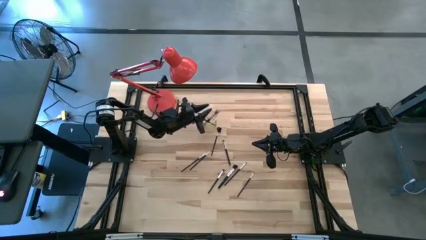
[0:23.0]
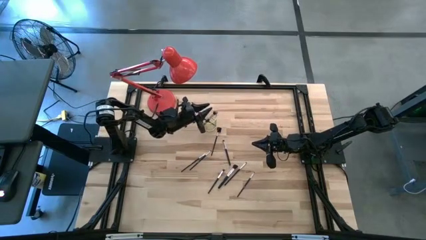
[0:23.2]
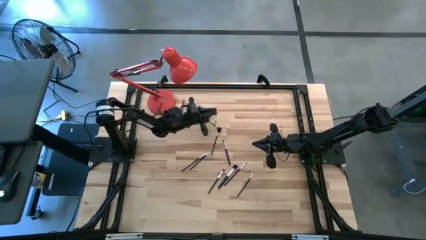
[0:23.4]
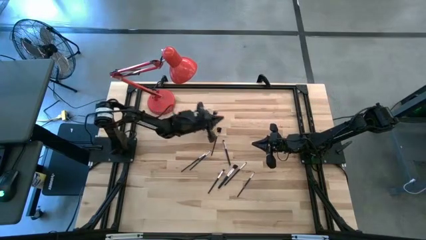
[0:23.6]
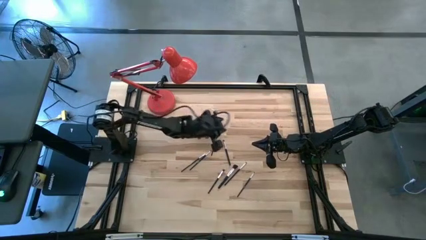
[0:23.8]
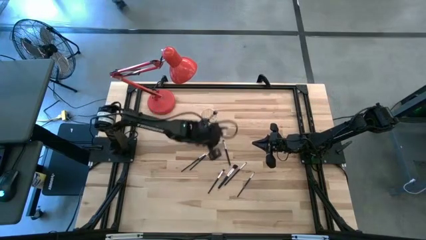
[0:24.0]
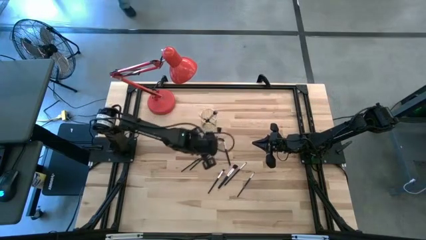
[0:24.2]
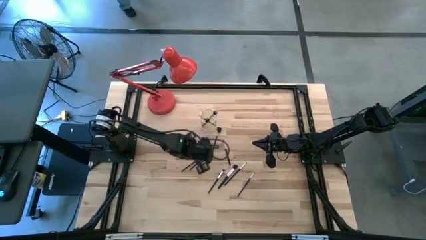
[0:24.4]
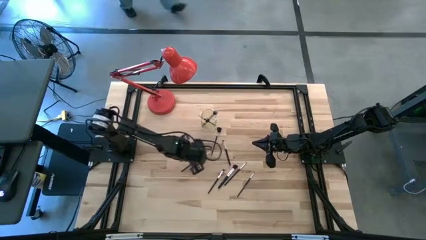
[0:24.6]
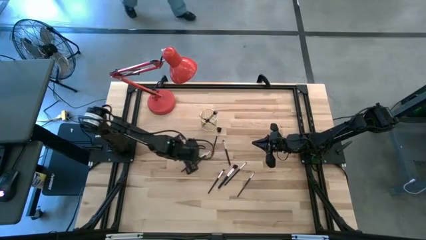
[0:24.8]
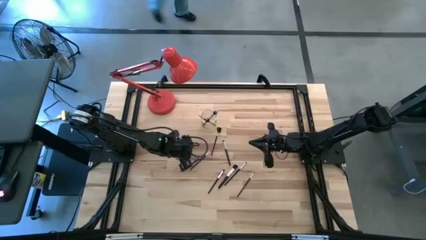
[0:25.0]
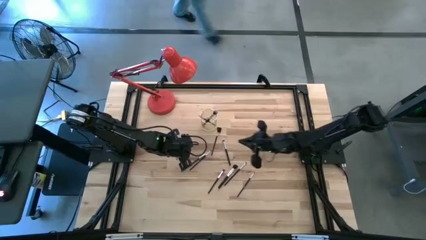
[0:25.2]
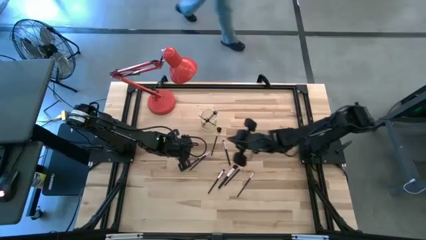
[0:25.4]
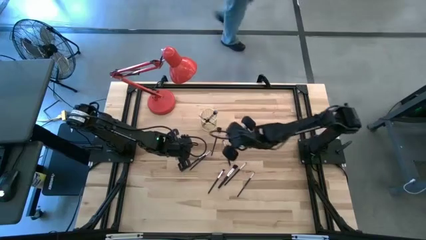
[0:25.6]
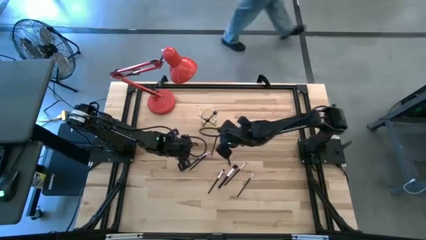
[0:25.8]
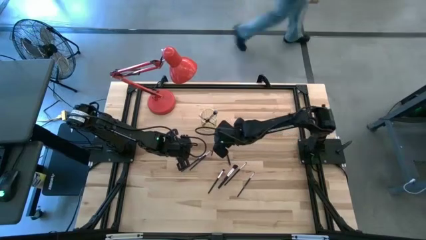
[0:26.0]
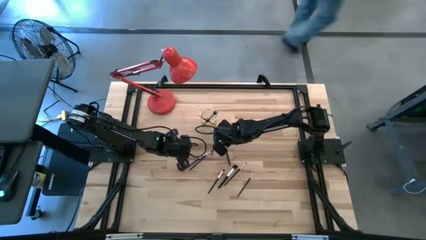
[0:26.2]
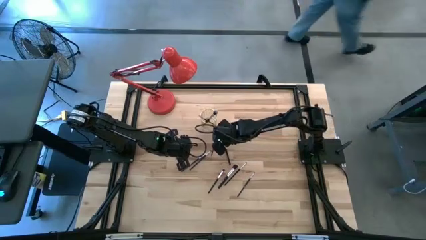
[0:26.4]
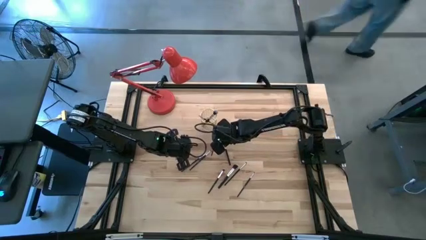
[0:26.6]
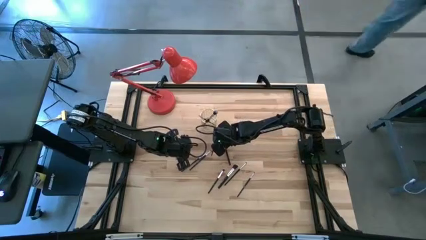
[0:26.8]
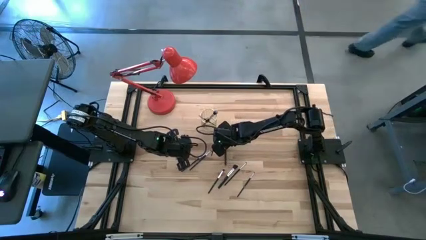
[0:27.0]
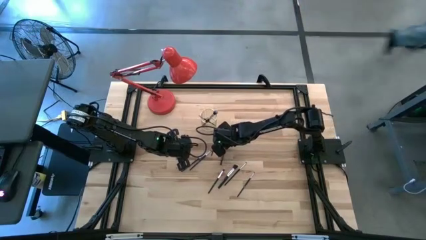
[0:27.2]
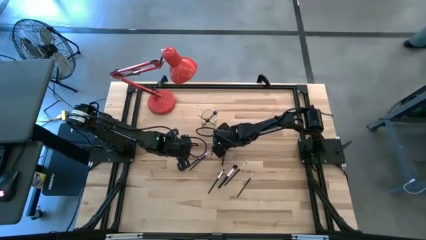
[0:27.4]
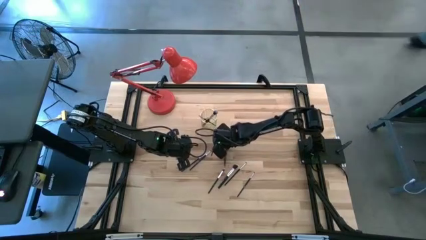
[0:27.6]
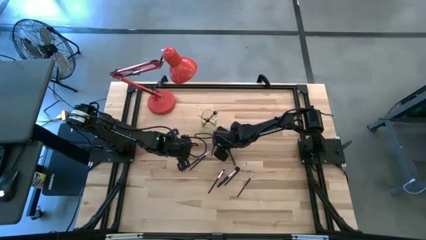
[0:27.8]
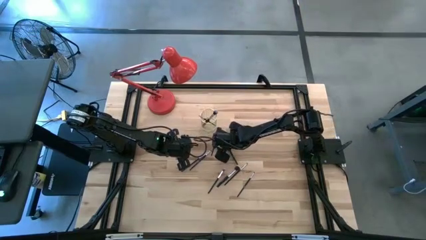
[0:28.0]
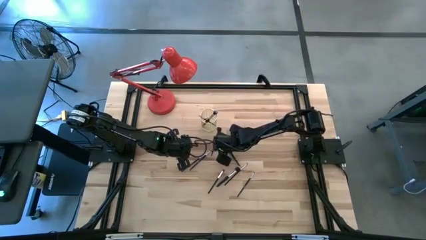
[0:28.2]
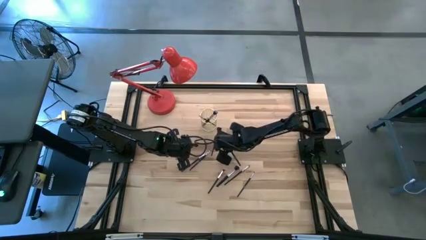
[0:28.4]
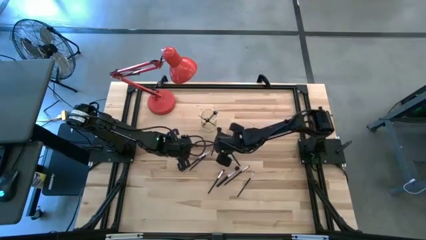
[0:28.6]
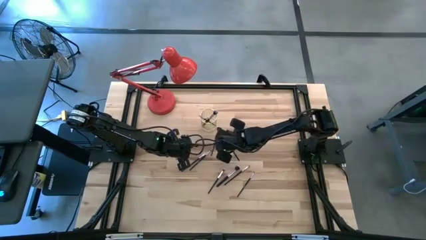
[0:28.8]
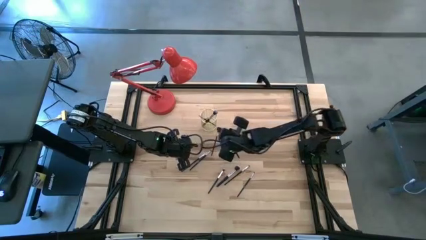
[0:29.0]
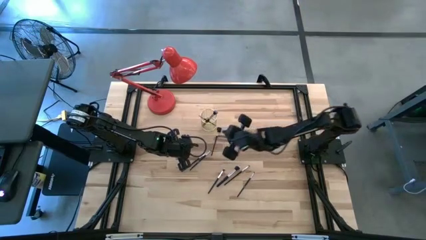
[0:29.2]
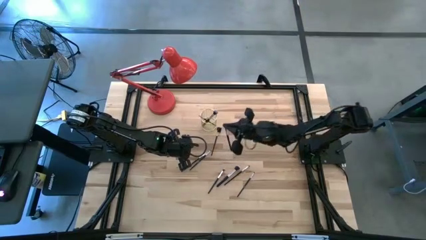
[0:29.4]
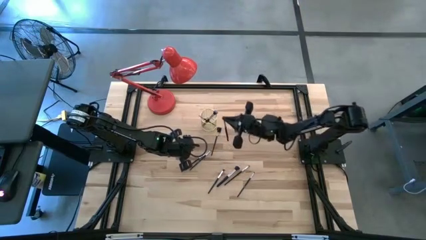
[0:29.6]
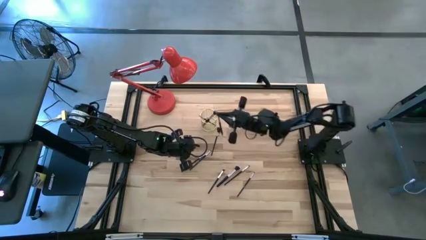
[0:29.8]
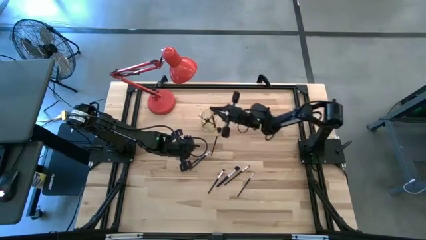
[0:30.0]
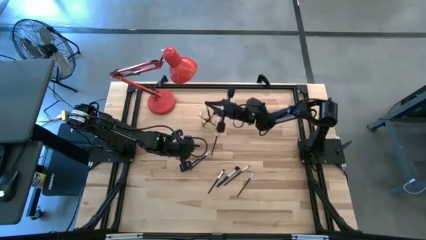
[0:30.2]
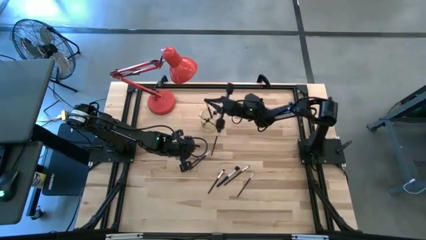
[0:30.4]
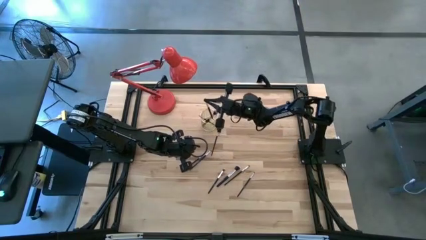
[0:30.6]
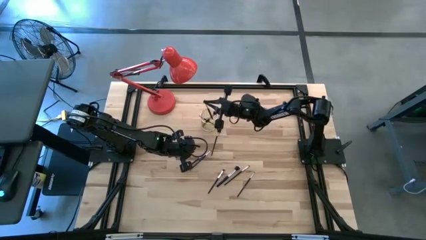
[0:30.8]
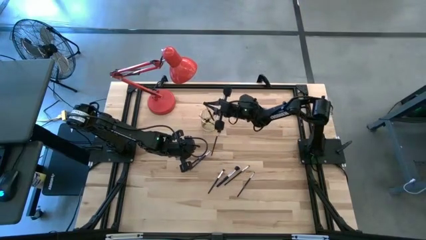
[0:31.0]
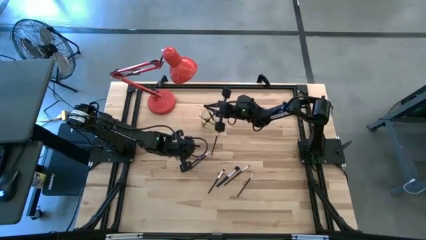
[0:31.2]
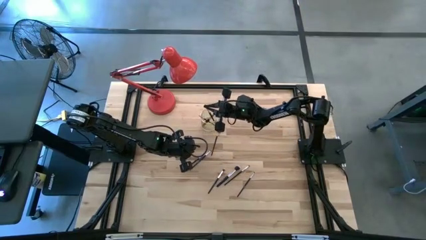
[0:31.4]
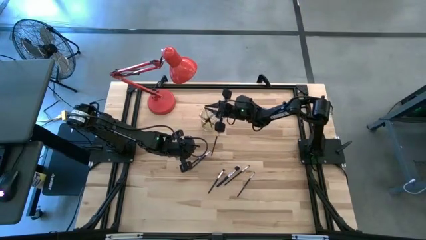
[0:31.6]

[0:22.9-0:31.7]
Task: Put items in baskets/containers
Put the black foundation brush into the gold pen holder

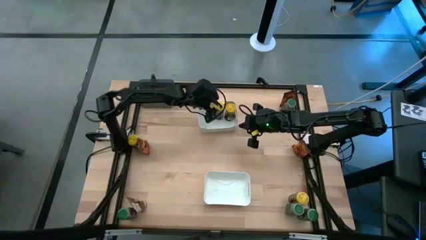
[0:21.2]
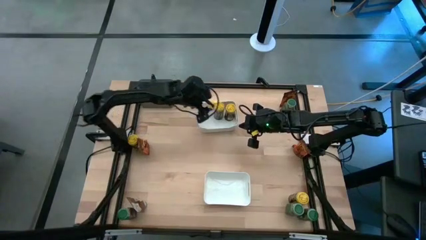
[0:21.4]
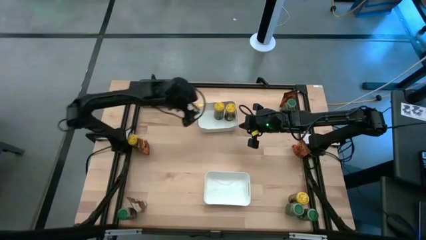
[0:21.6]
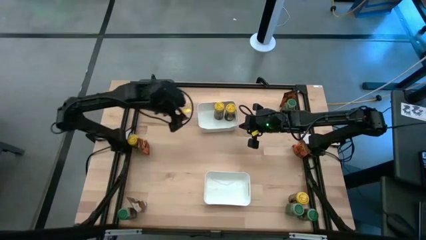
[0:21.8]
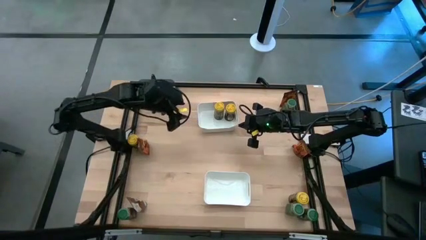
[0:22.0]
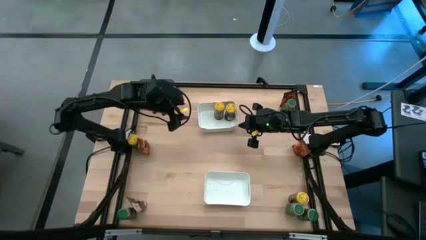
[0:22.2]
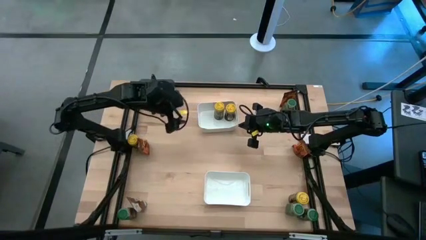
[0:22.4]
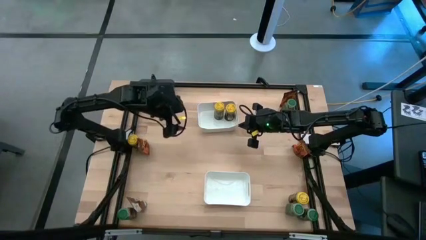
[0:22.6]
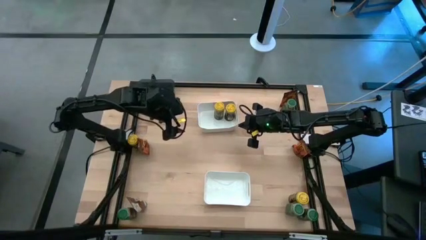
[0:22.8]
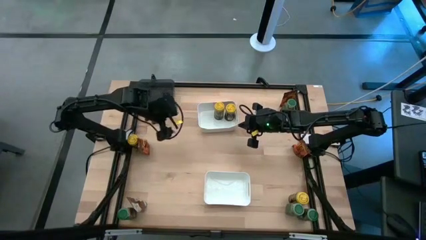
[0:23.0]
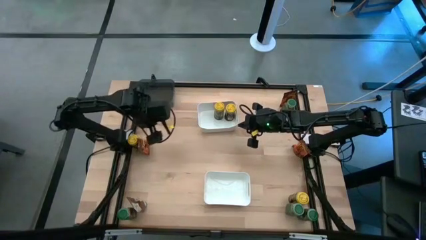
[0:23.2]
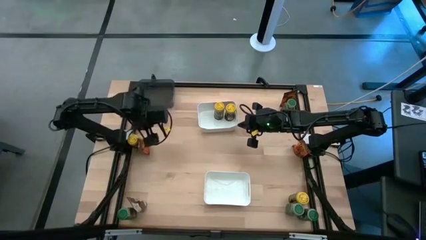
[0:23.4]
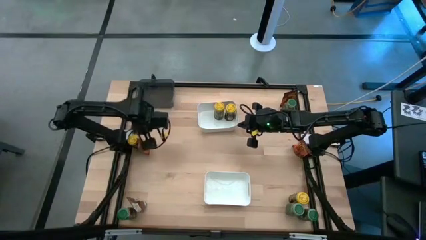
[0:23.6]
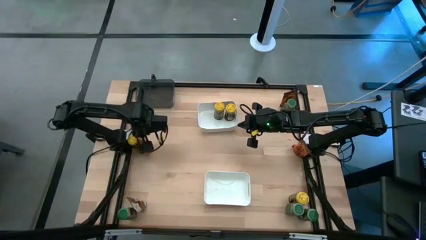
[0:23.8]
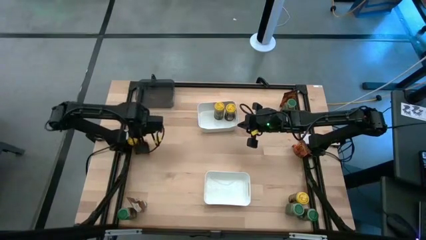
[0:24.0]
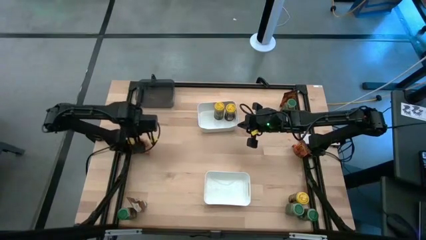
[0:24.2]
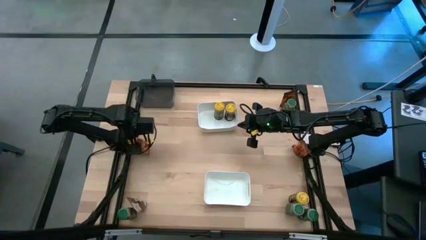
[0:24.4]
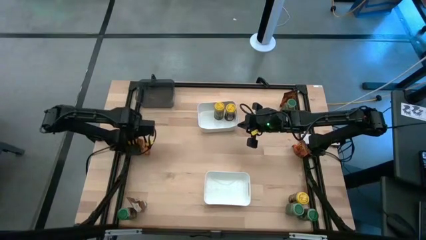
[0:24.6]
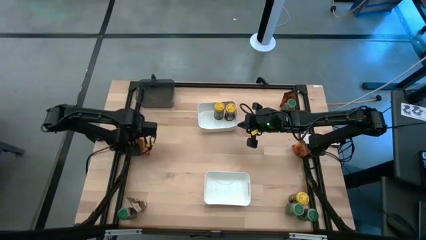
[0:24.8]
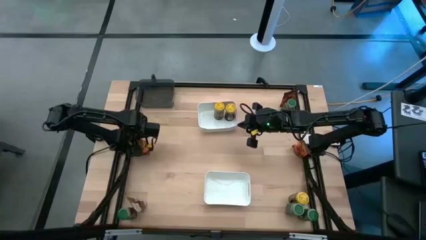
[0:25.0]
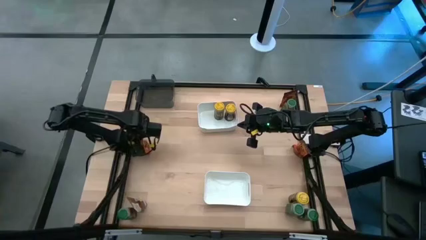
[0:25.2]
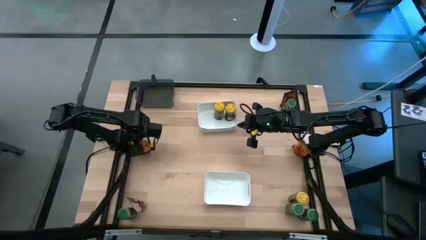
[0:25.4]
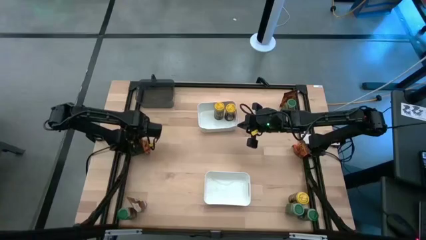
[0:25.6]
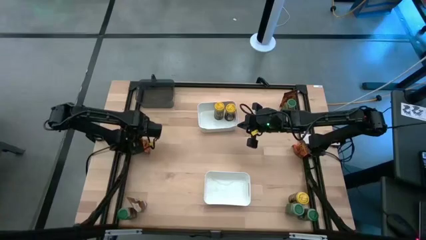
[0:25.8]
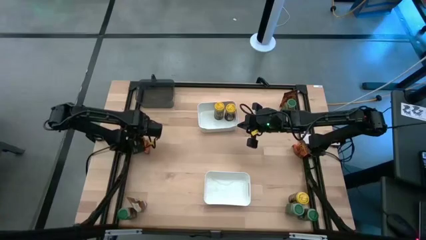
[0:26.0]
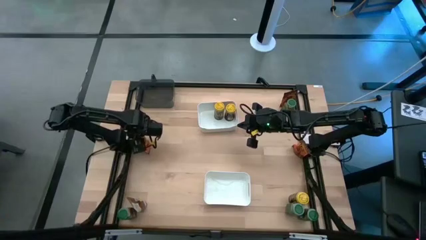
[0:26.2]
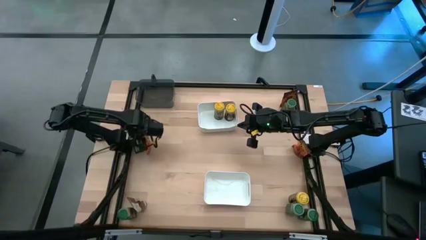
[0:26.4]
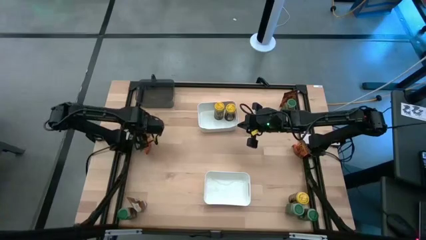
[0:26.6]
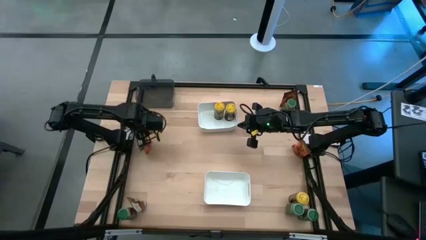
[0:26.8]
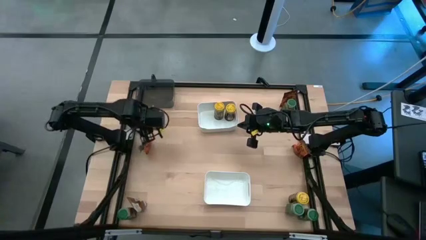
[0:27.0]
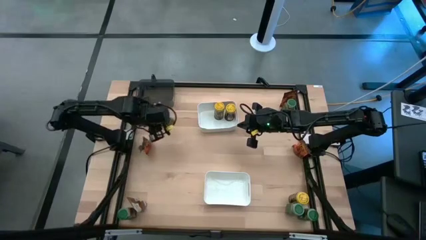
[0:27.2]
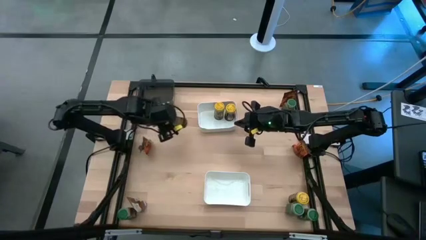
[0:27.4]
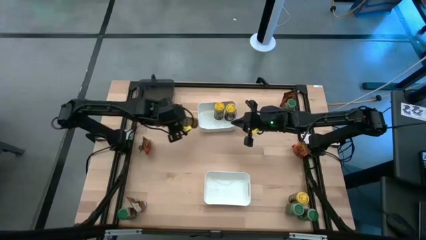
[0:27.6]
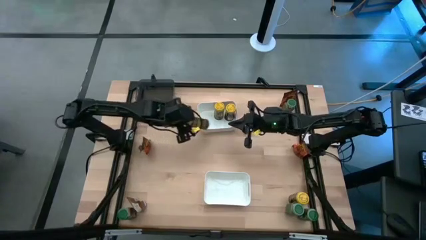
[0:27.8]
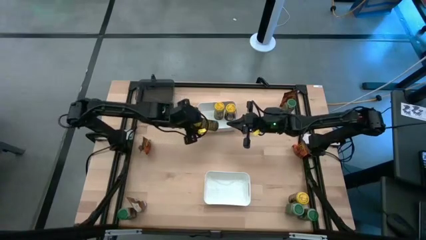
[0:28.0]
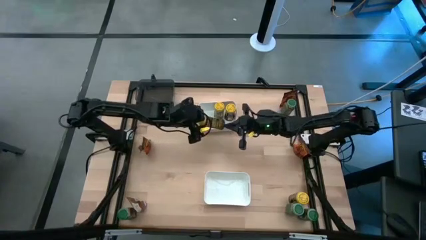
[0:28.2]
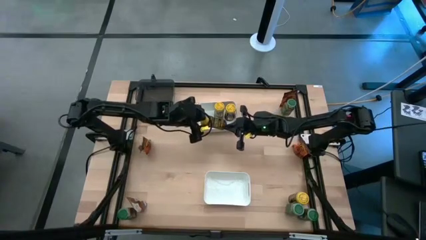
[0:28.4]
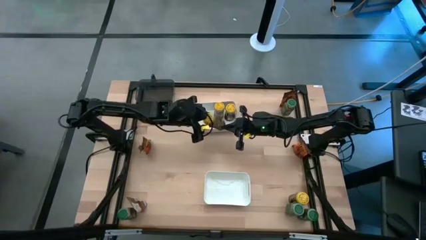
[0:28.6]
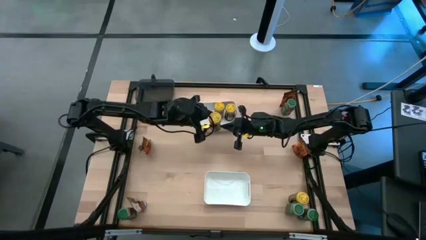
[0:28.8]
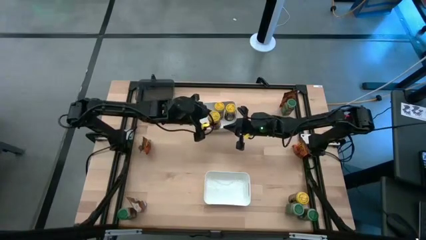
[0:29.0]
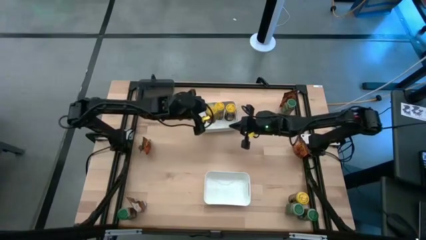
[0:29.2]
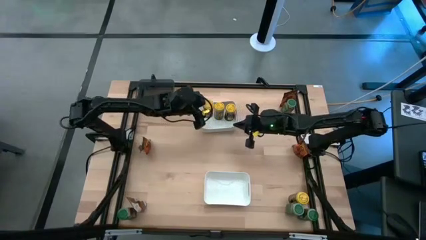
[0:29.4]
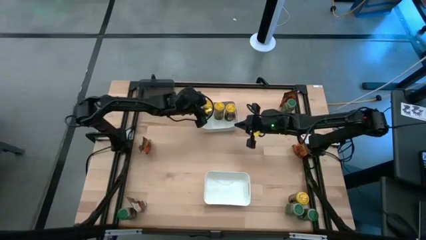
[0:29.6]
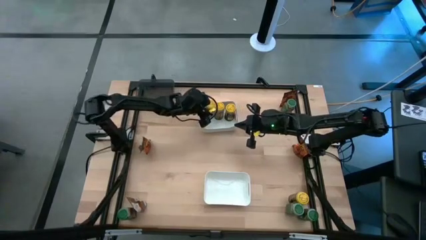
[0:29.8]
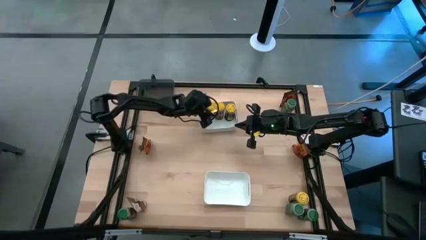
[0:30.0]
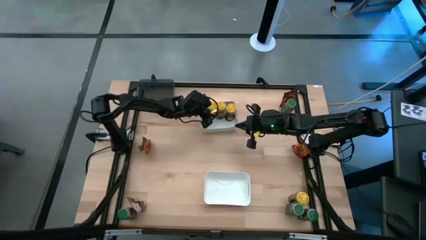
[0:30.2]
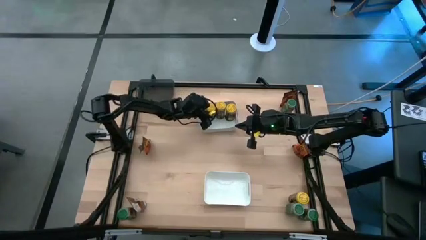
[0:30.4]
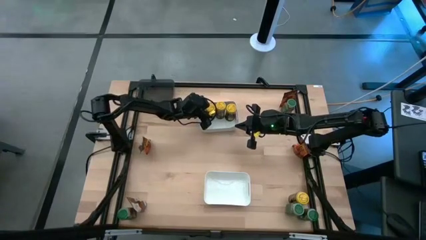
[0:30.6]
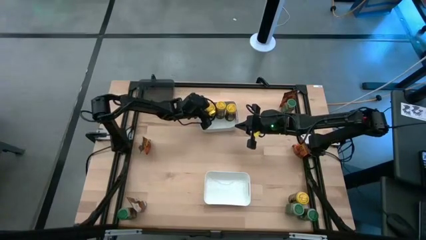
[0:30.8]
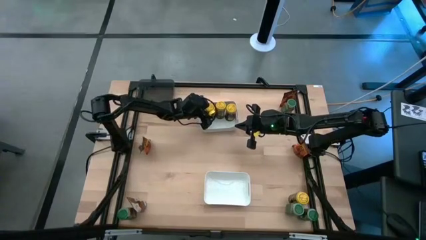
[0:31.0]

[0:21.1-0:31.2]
Task: Sort spices by type
Put the seasoning bottle into the top white bin
